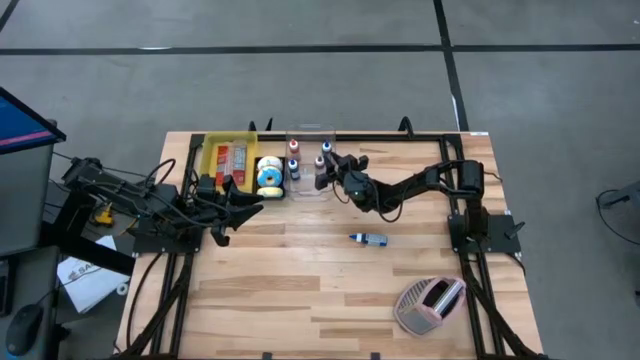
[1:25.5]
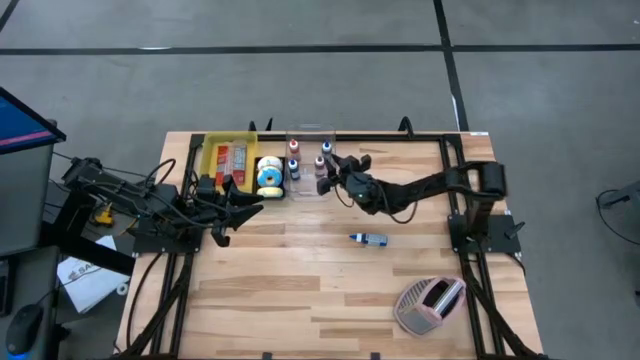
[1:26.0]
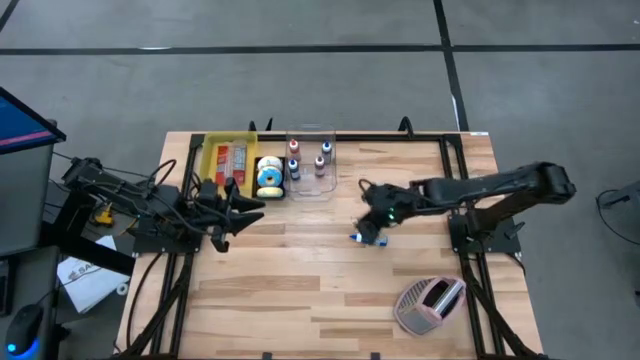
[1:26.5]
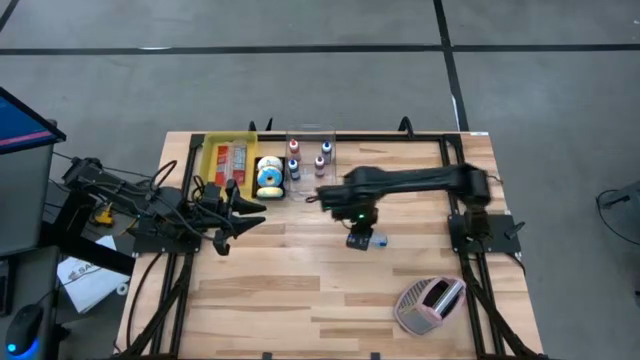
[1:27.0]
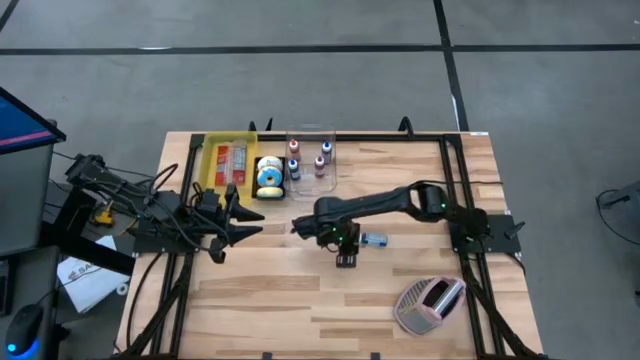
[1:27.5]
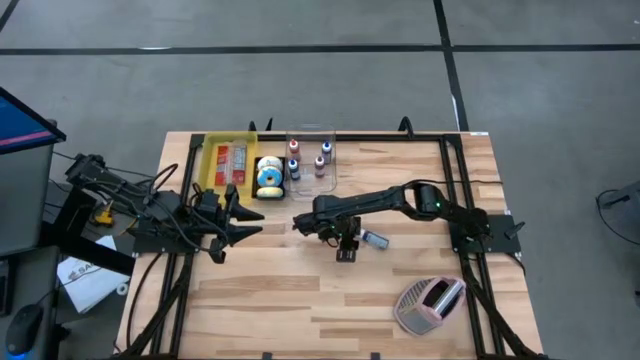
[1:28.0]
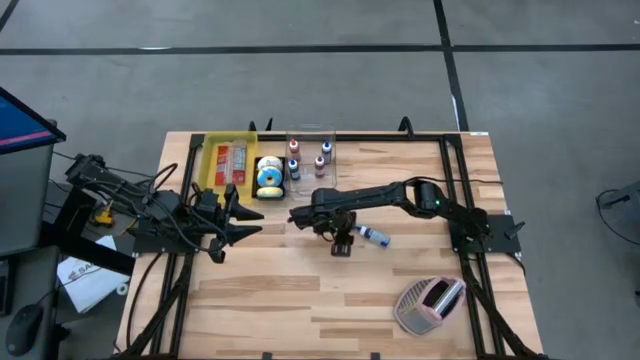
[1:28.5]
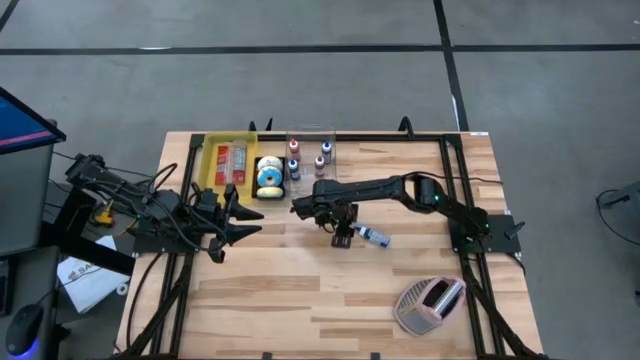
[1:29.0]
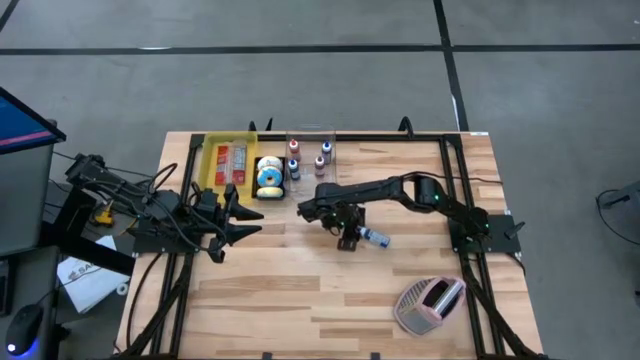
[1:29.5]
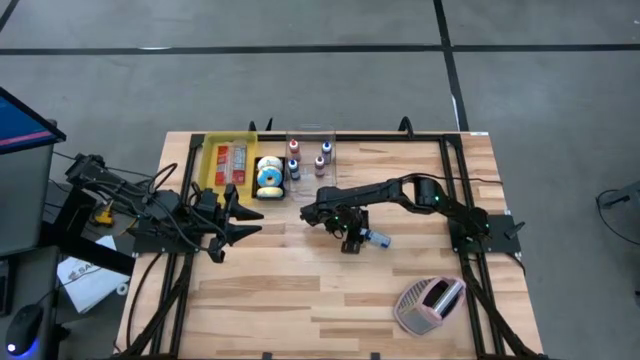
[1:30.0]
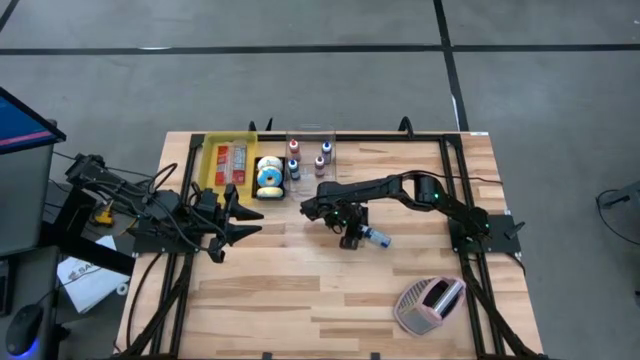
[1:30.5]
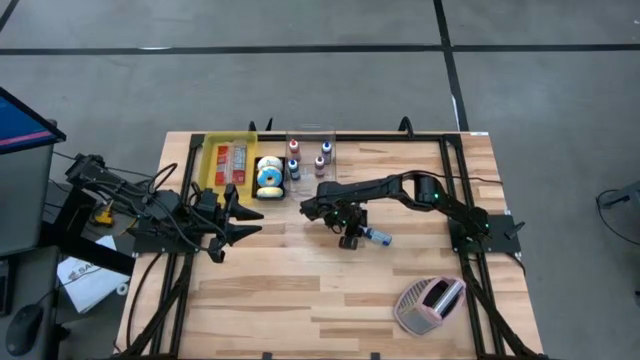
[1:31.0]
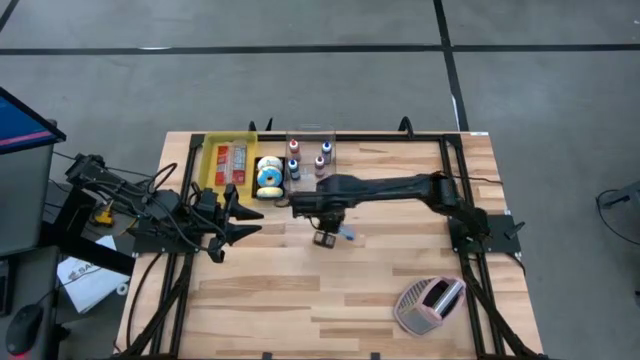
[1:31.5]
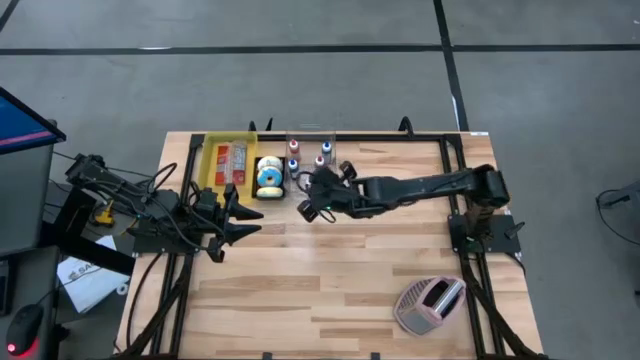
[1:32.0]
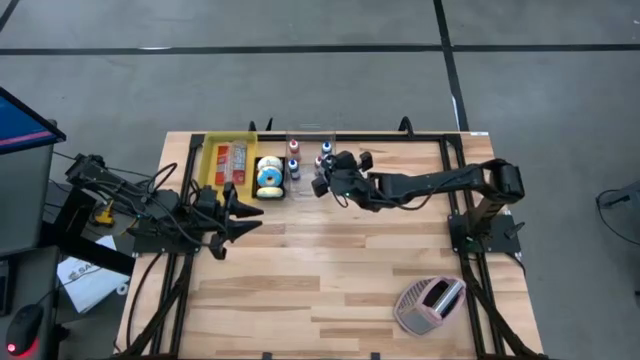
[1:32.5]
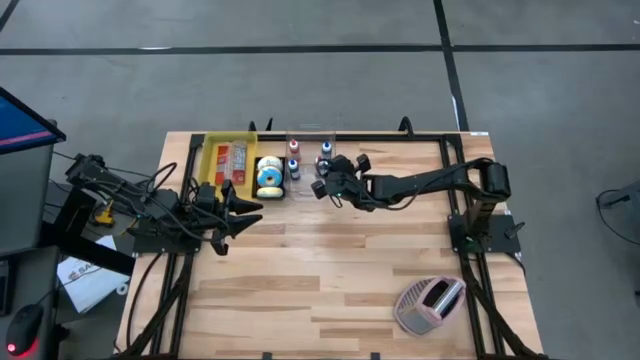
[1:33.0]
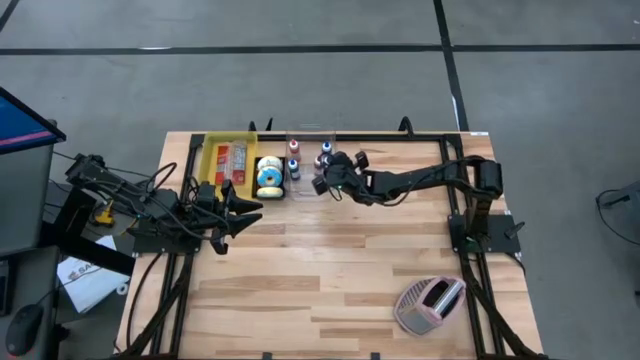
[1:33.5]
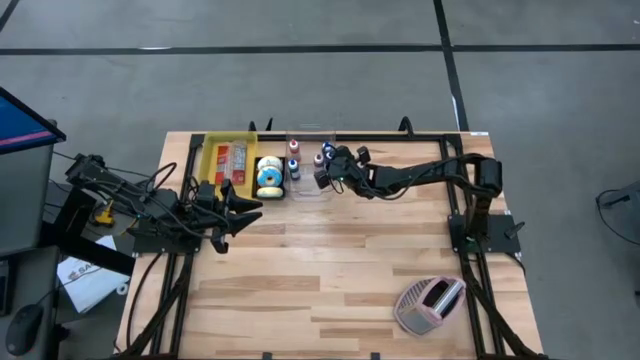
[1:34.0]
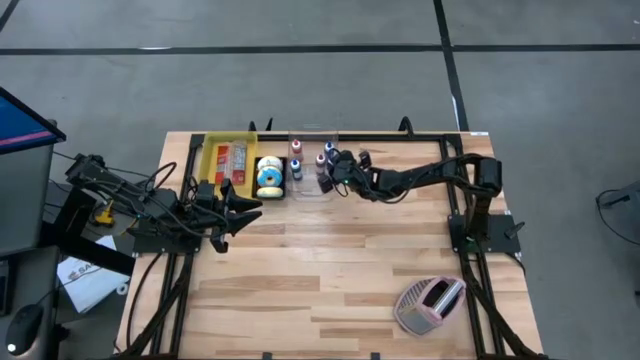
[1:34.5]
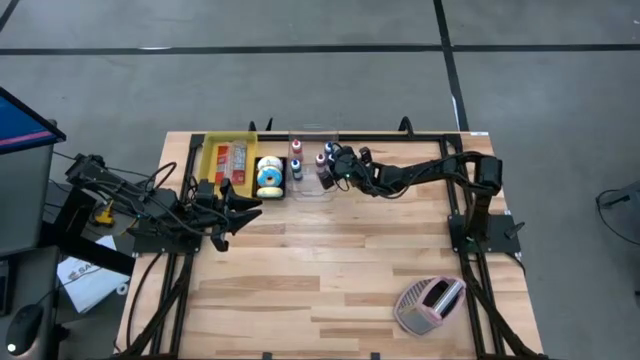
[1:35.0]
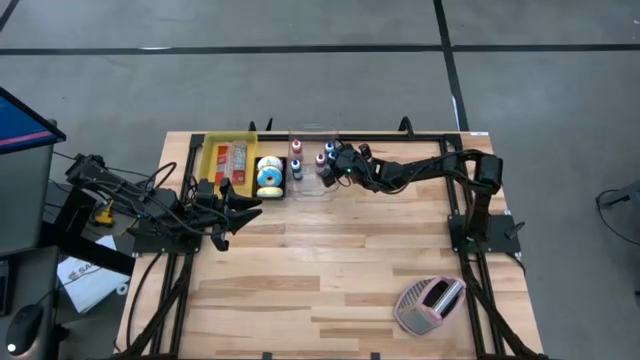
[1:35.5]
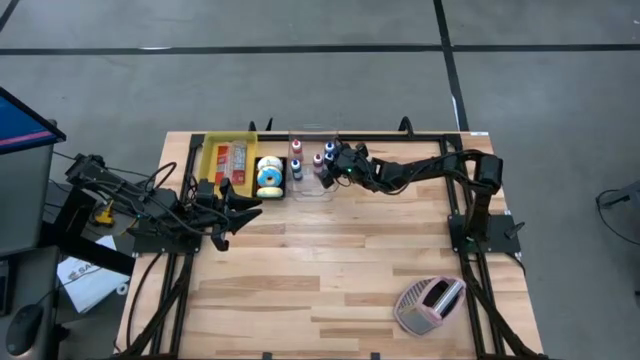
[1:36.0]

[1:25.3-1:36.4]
Put the blue food coloring bottle into the transparent bin

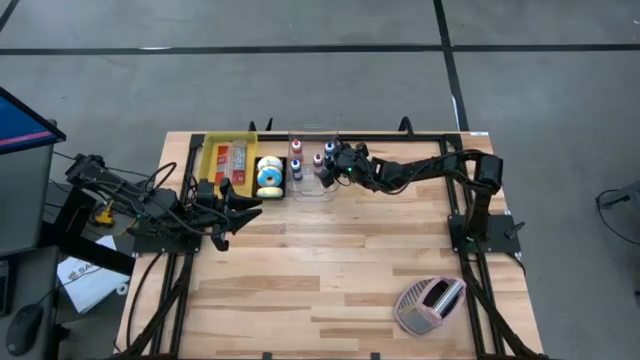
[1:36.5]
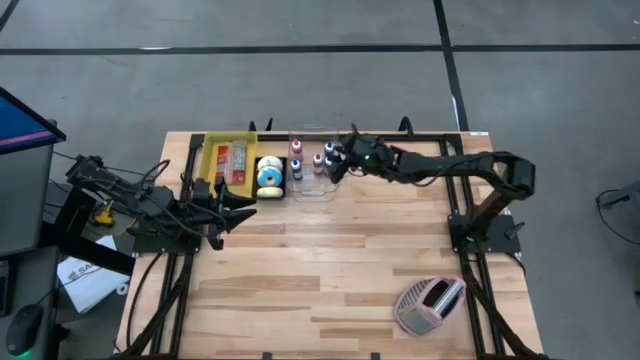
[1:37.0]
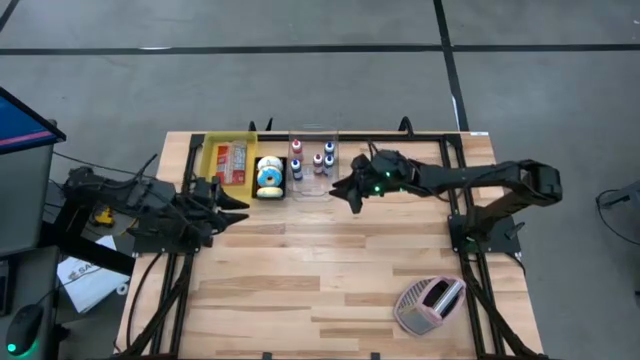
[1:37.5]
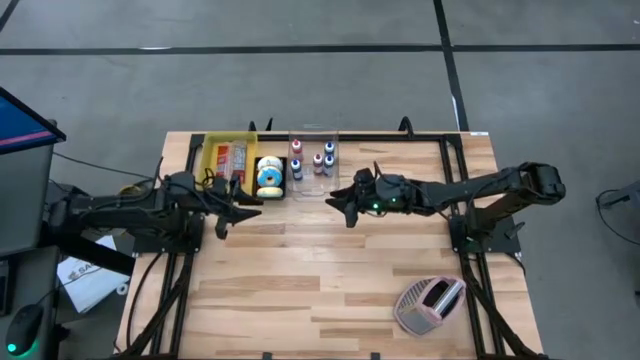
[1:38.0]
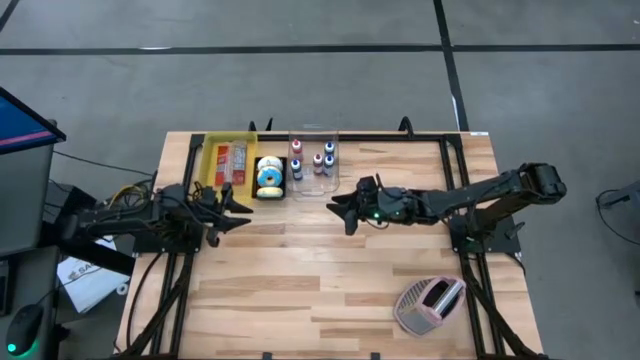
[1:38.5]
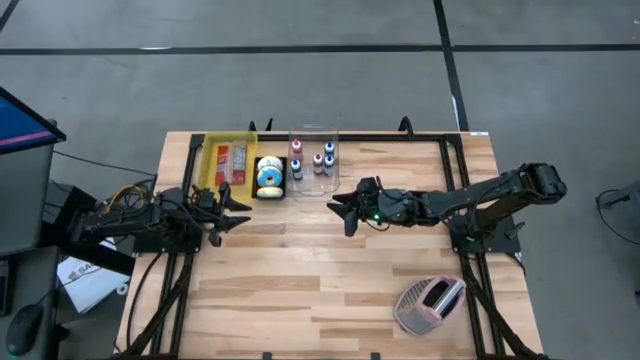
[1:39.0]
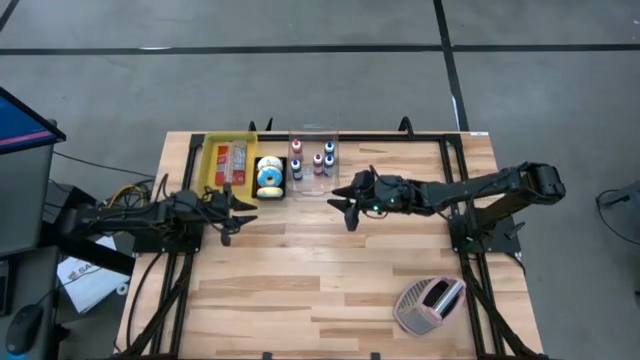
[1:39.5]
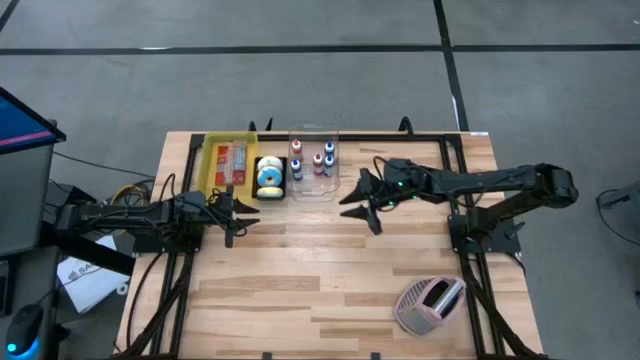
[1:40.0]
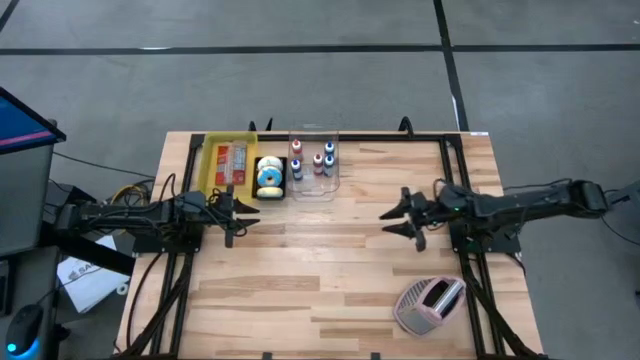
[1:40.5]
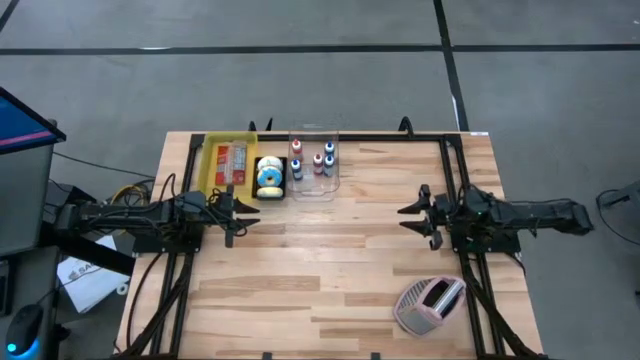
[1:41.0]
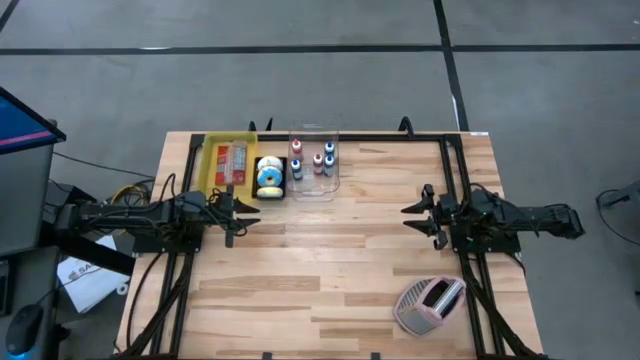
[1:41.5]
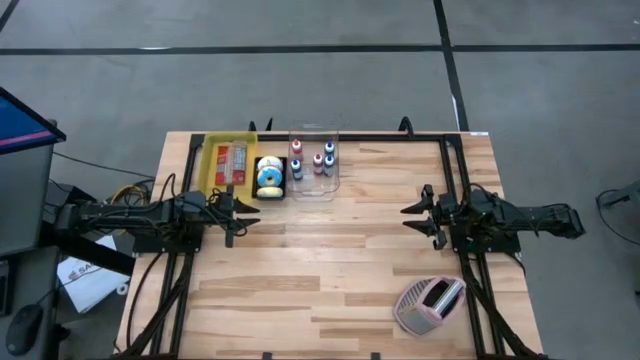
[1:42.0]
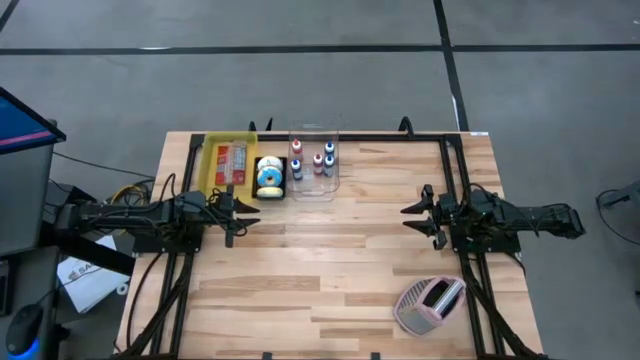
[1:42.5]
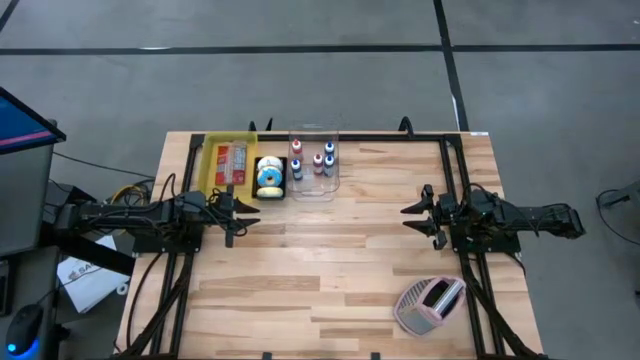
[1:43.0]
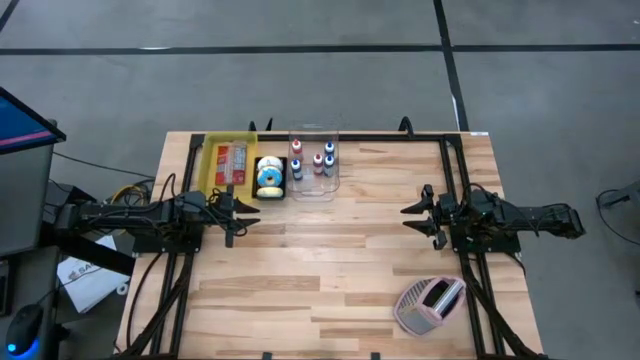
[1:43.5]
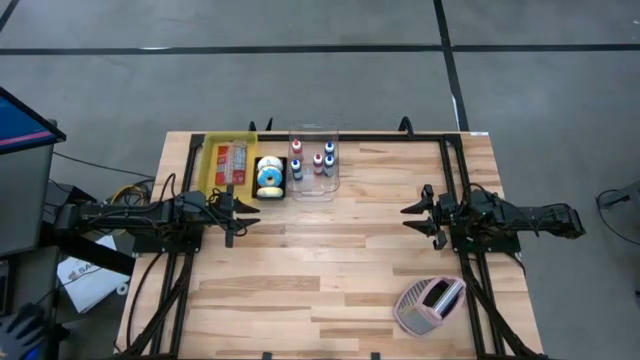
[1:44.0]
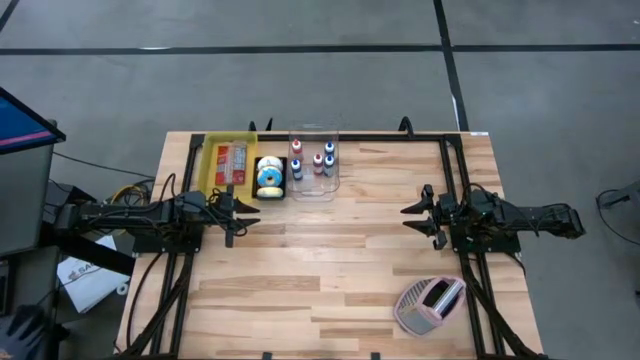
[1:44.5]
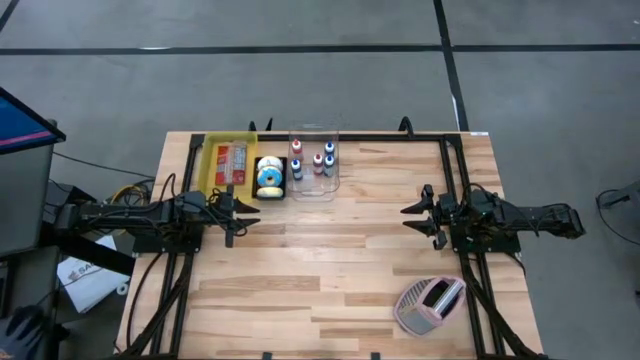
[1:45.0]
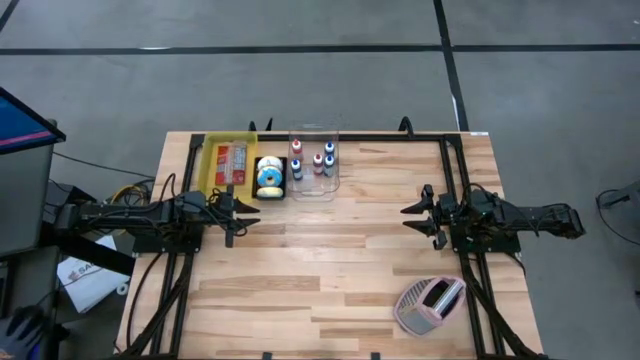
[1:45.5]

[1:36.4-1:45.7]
Return to Home Position
